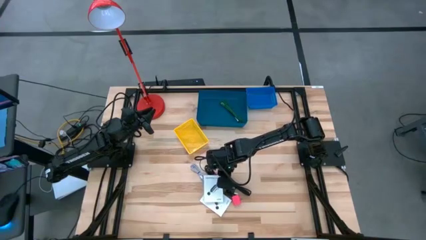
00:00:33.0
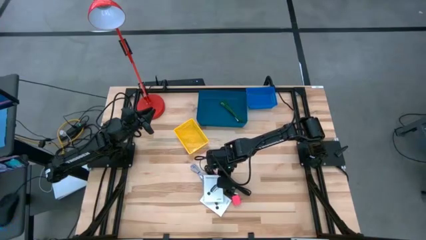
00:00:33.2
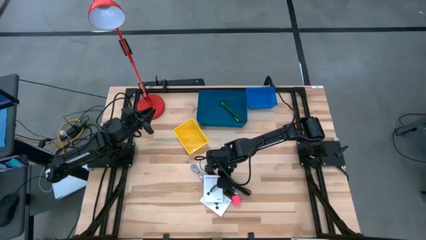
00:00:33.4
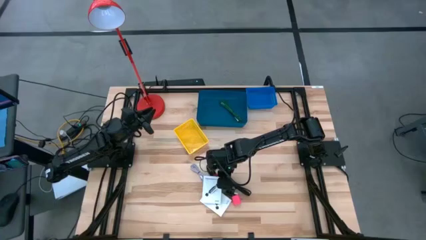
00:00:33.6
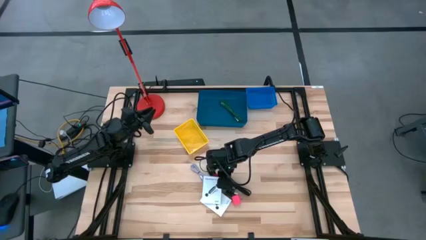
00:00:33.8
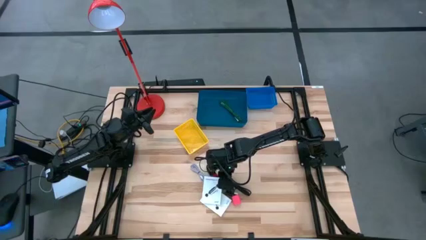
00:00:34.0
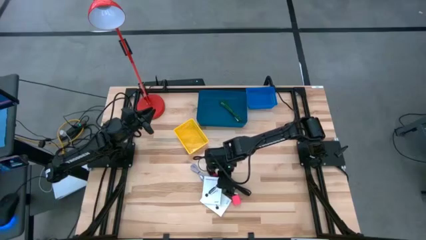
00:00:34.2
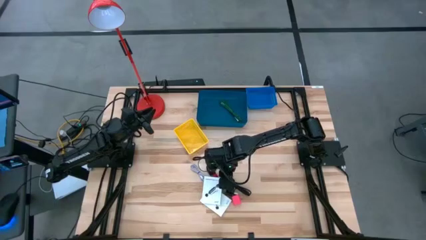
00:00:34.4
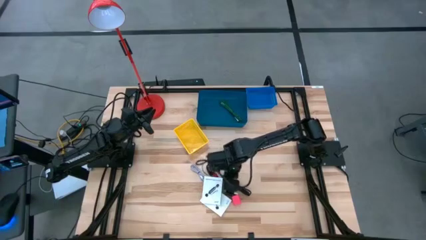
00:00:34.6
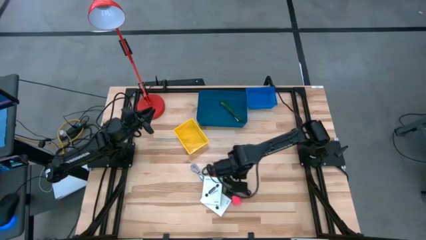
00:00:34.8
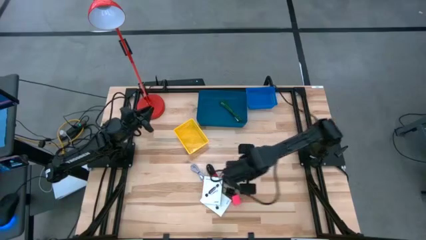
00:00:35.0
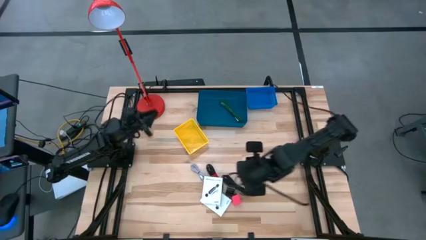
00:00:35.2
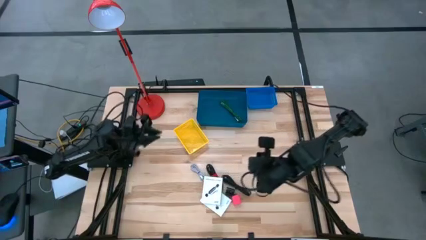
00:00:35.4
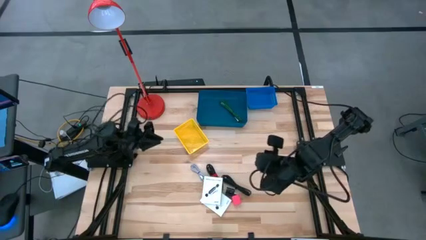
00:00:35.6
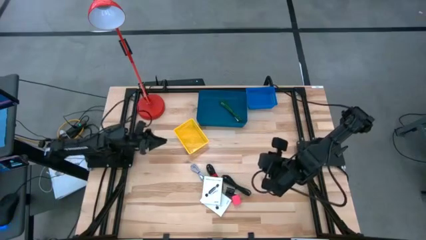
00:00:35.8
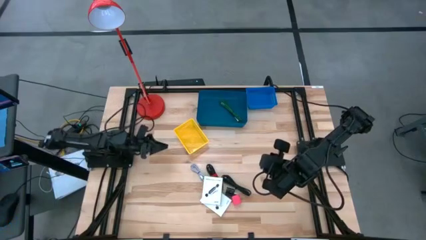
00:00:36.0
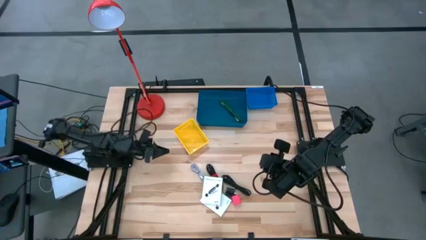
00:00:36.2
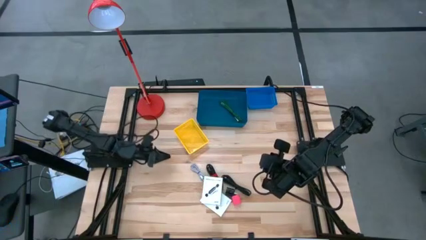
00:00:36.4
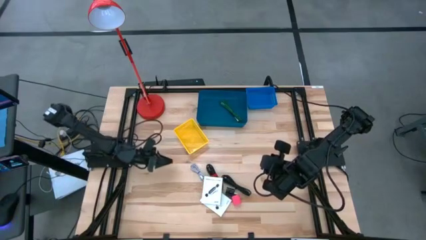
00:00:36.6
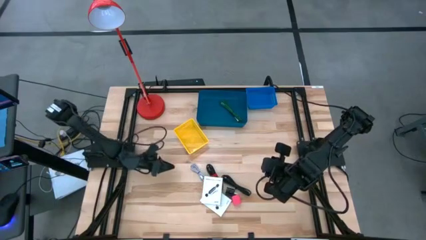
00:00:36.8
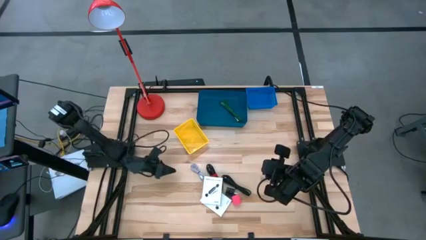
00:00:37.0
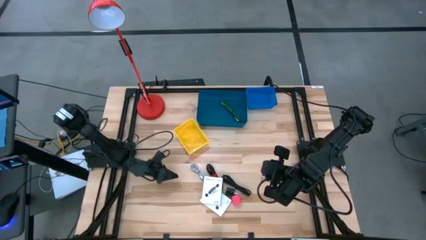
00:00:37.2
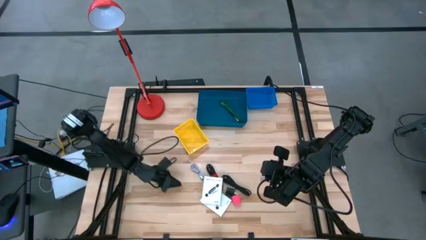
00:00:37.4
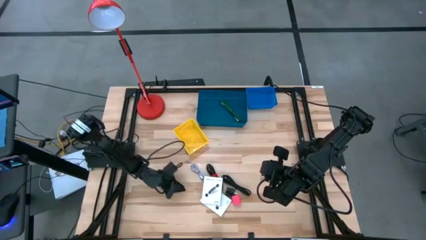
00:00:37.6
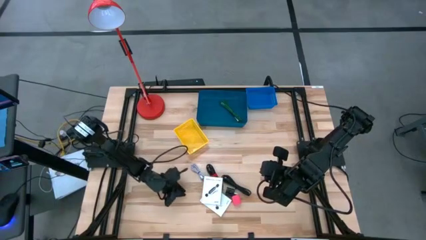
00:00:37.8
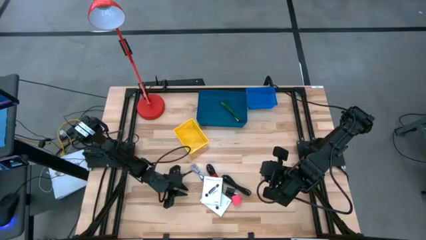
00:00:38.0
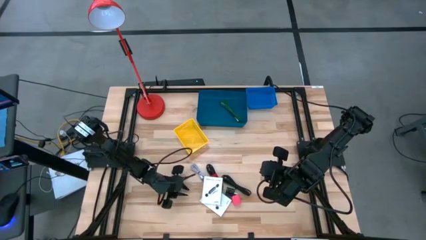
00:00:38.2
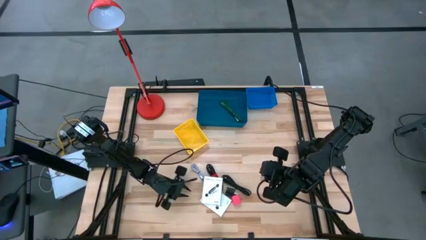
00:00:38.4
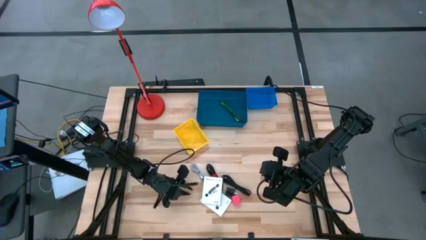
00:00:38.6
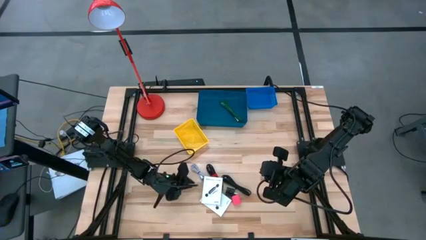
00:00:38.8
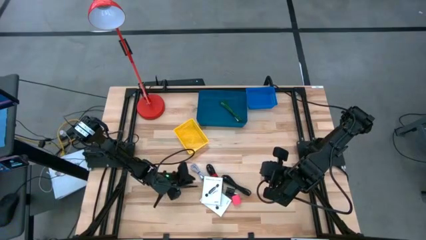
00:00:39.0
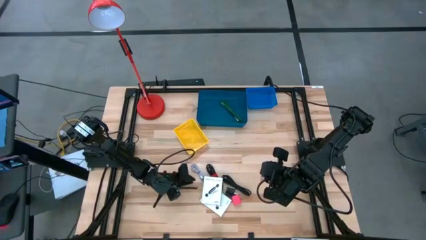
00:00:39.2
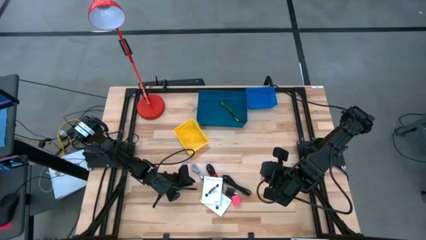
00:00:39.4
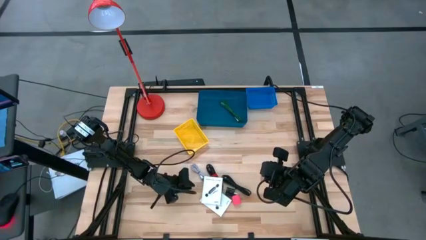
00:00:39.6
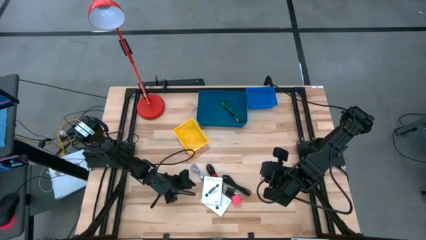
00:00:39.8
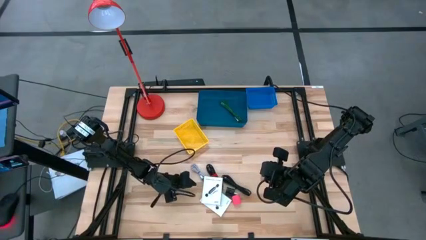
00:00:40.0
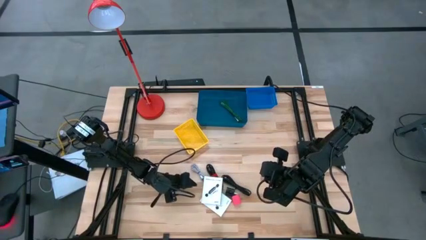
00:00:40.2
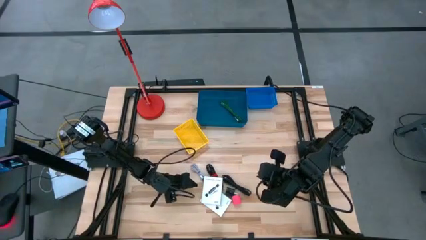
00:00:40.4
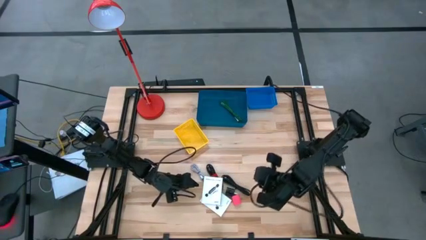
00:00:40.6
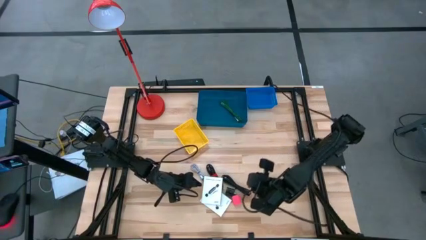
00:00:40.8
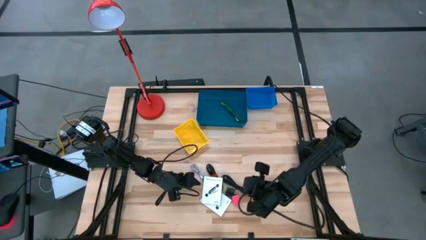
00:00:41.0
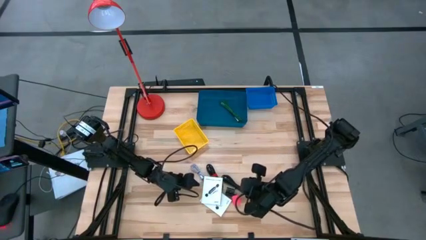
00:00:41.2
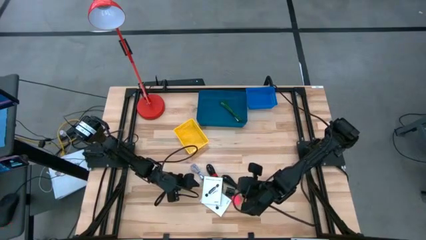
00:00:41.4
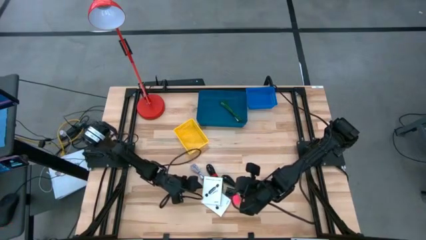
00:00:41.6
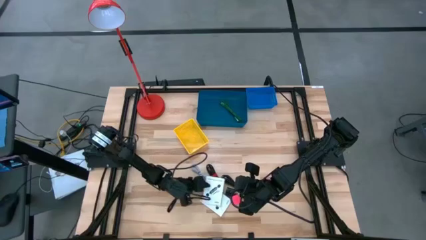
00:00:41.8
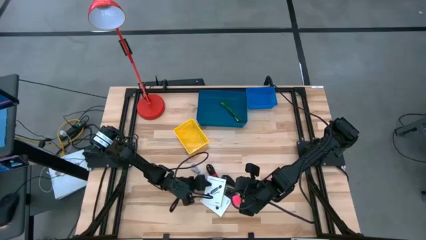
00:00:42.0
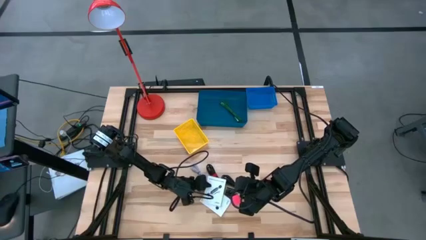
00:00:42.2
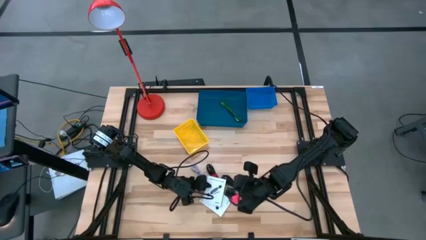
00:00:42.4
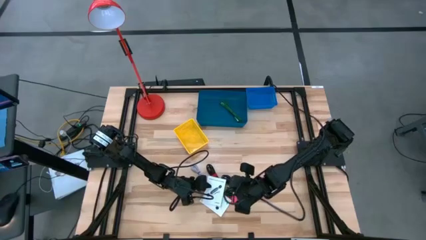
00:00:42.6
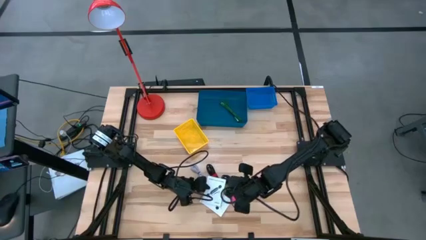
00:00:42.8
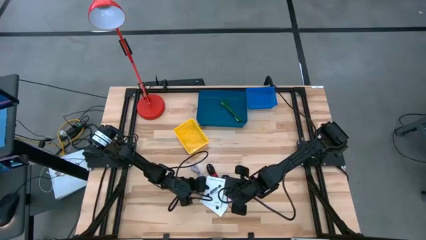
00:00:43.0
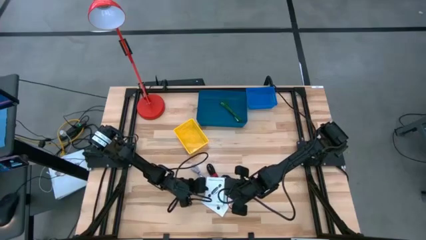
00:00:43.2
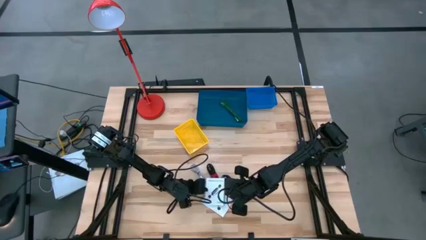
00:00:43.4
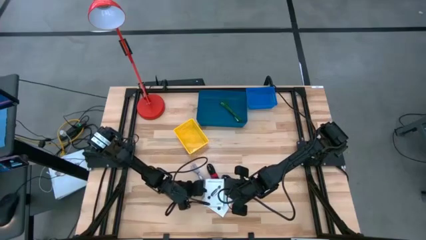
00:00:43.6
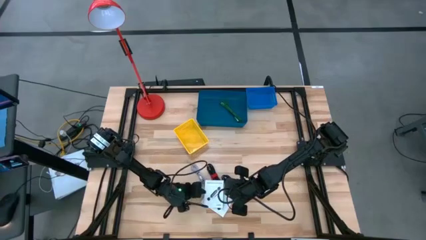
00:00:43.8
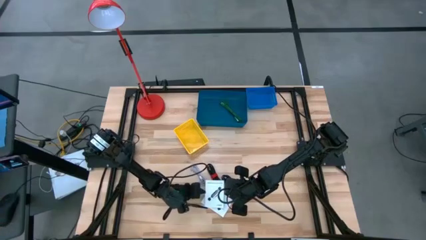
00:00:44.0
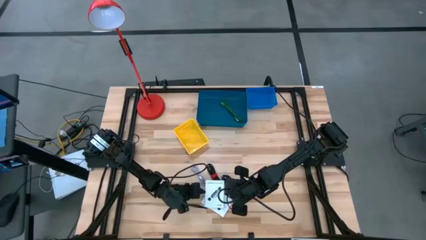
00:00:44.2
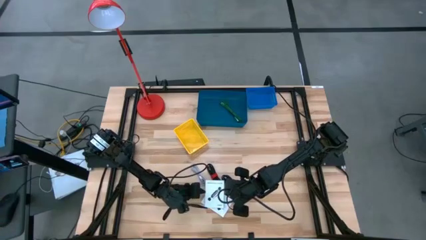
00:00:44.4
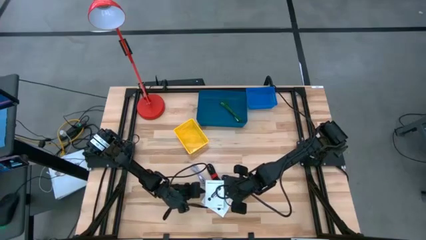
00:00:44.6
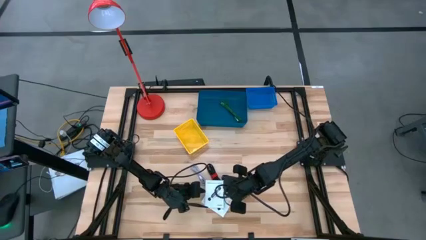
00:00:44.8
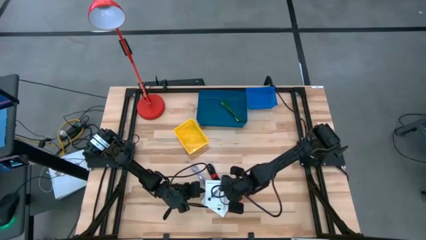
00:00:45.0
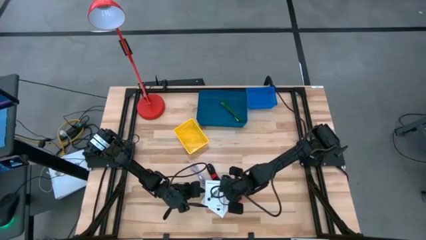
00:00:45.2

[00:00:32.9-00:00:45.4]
Task: Pick and place items into bin
Put the top white card reader box into the yellow bin

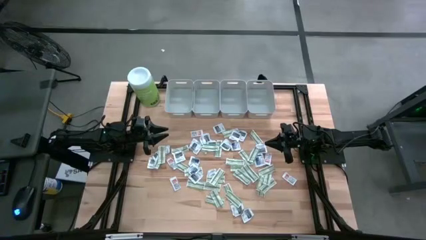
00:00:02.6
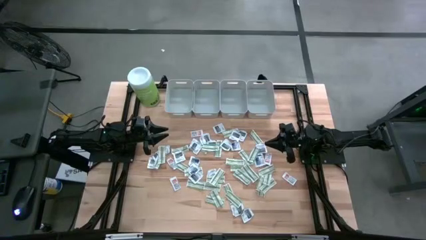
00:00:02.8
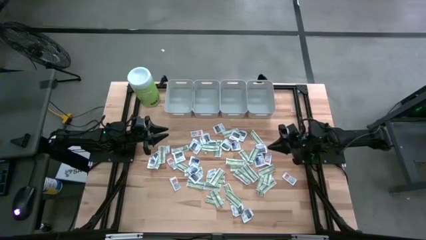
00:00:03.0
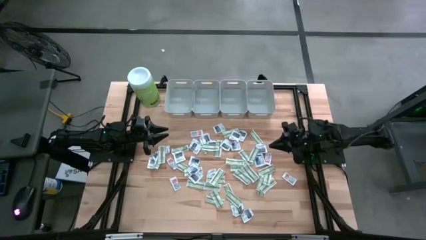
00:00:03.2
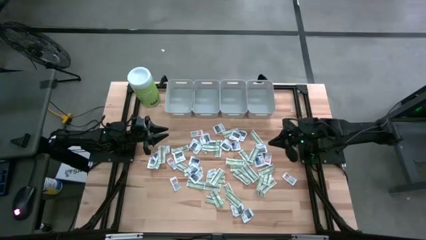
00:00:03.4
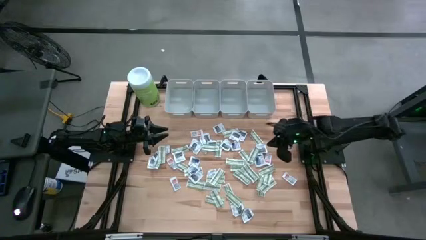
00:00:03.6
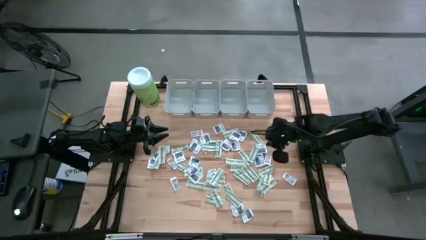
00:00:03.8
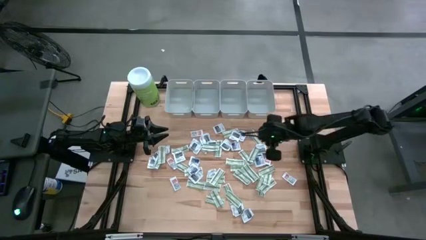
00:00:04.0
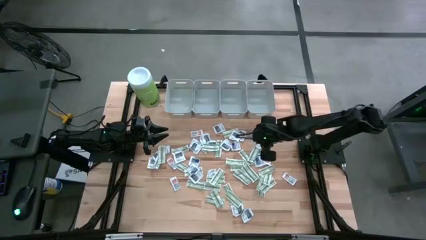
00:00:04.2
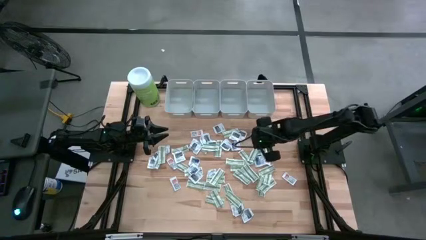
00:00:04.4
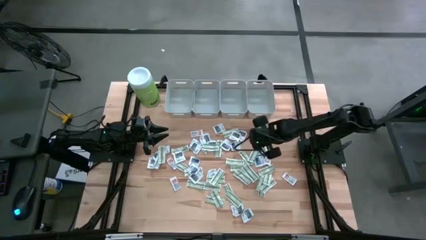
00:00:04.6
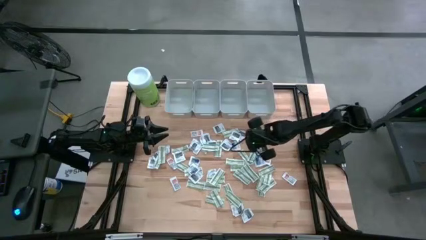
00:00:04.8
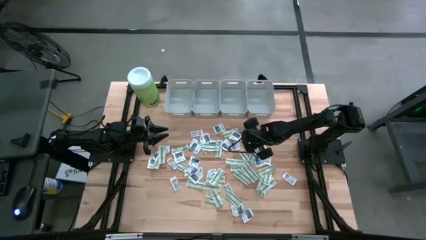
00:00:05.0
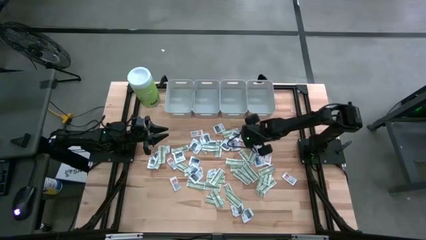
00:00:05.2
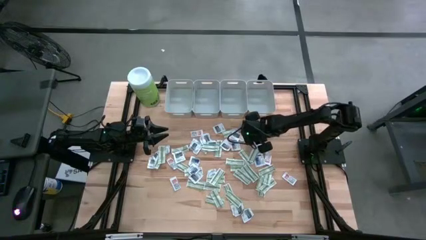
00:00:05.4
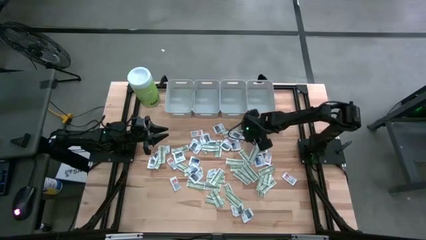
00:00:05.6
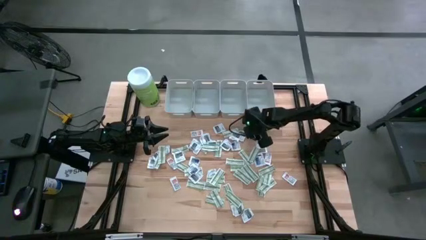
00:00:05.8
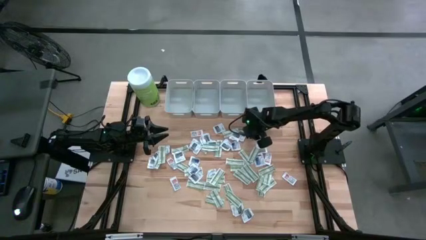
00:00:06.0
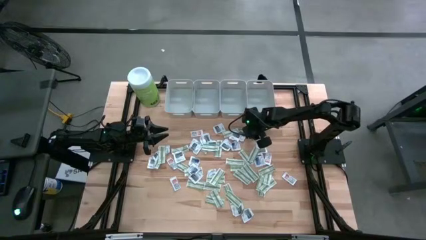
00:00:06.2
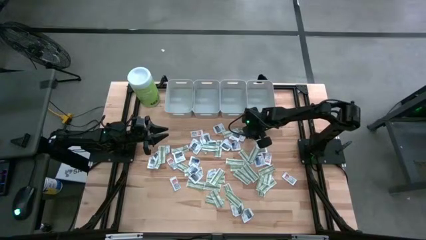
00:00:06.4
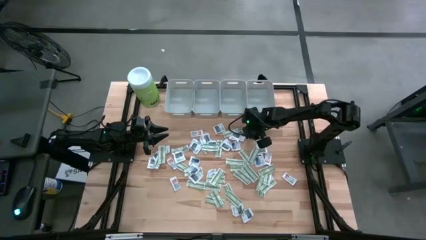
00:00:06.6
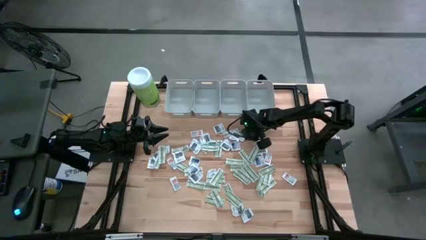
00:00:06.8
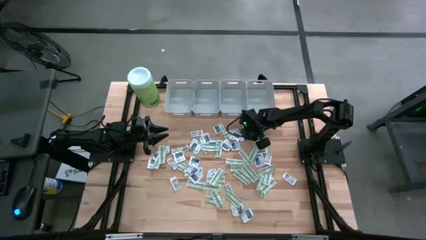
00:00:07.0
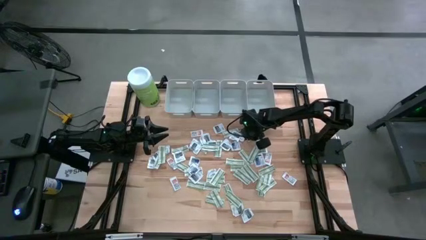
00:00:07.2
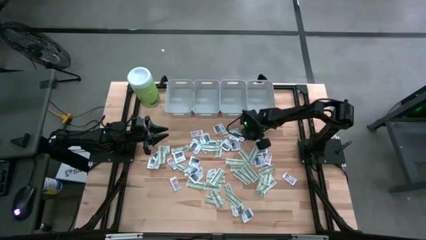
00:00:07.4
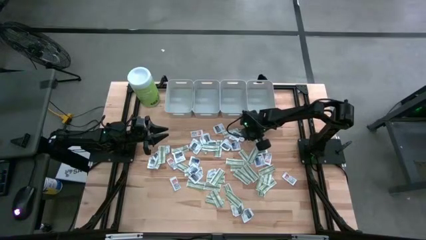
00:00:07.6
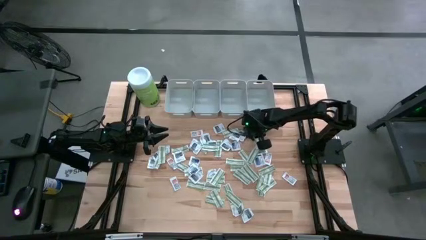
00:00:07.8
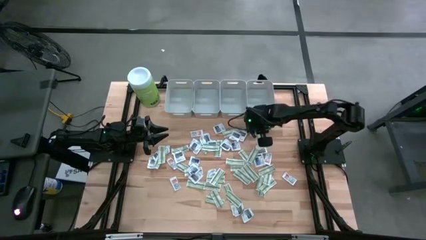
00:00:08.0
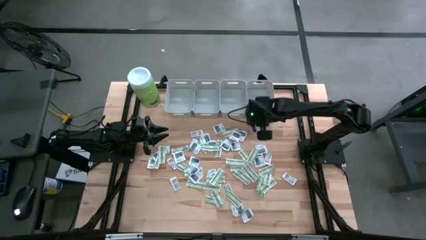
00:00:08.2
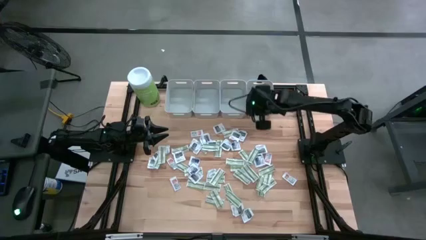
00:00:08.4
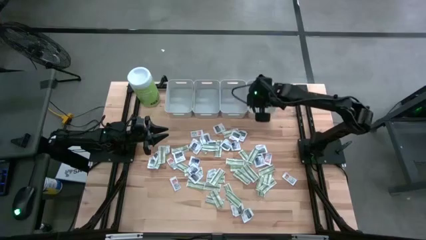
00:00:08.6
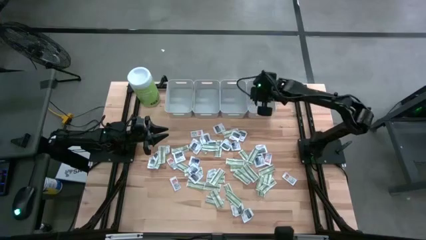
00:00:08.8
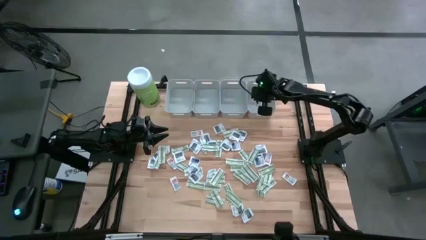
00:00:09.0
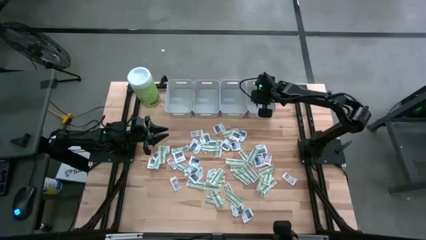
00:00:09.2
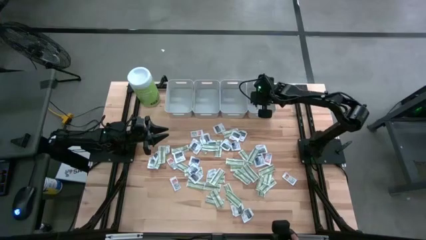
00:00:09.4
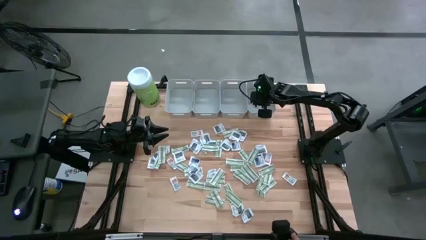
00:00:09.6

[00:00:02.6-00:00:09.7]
Task: Pick & Place First Aid Supplies
Put the bandage into the right gray bin
